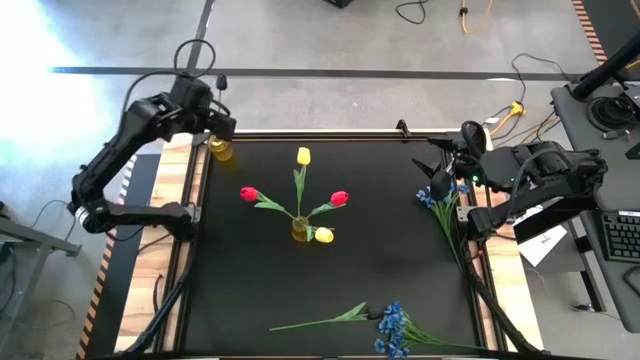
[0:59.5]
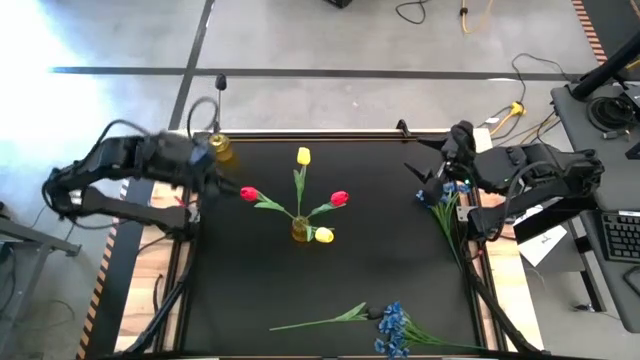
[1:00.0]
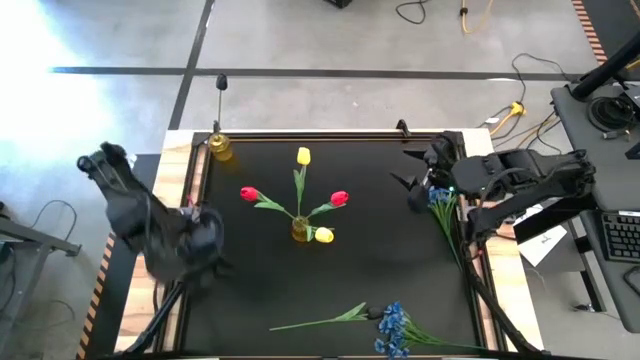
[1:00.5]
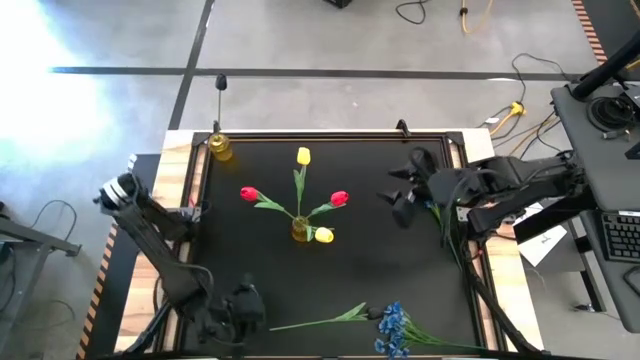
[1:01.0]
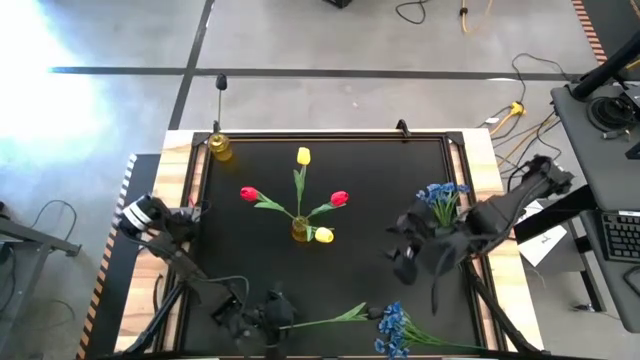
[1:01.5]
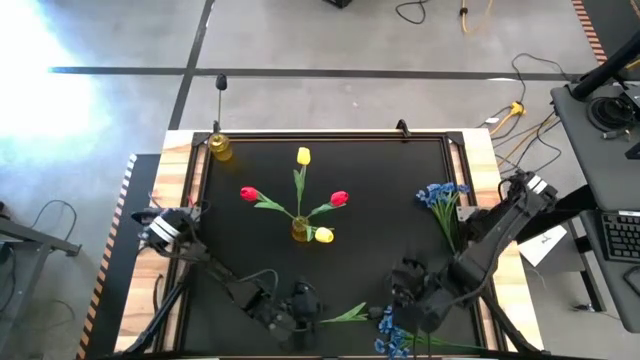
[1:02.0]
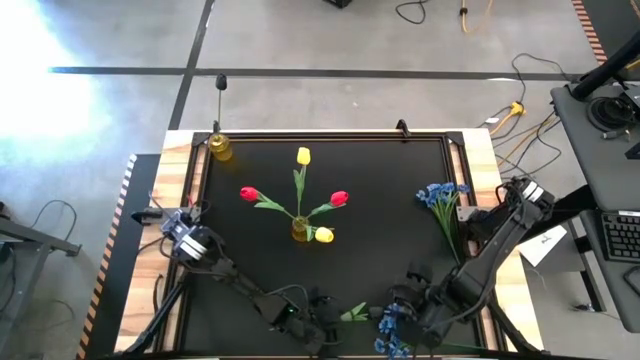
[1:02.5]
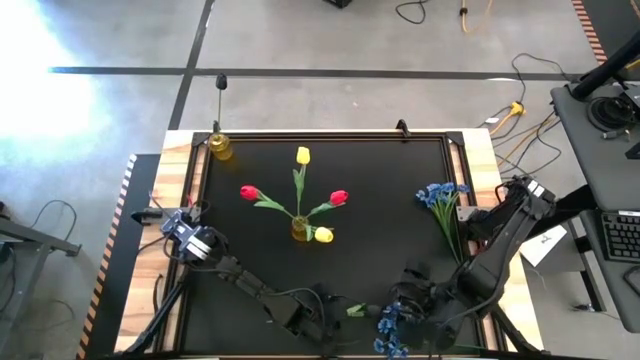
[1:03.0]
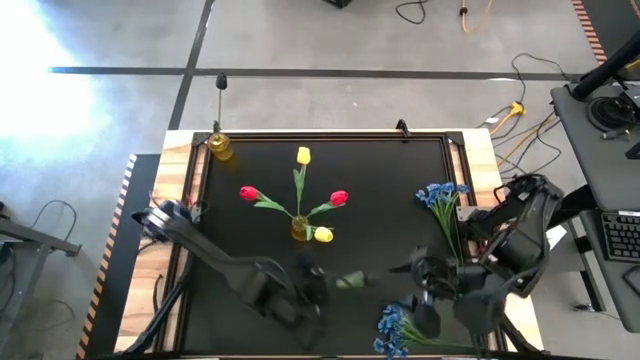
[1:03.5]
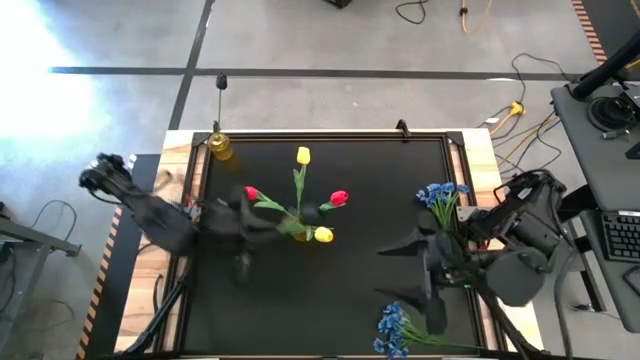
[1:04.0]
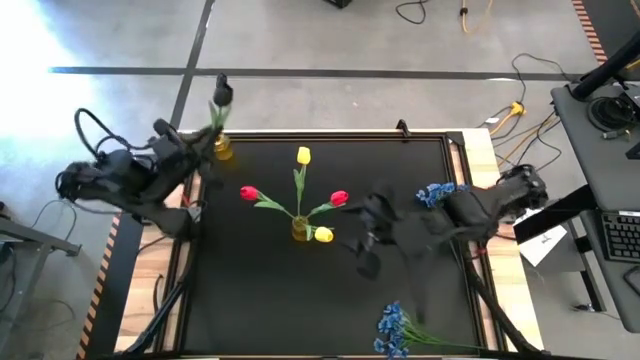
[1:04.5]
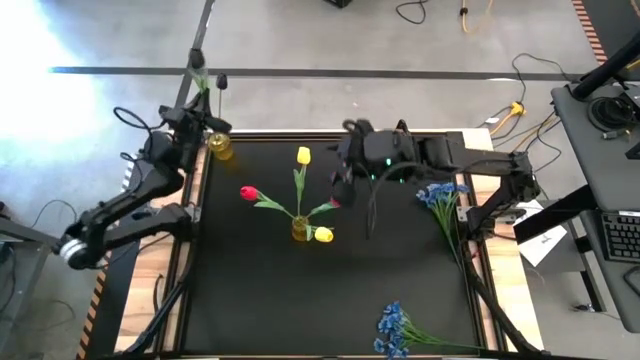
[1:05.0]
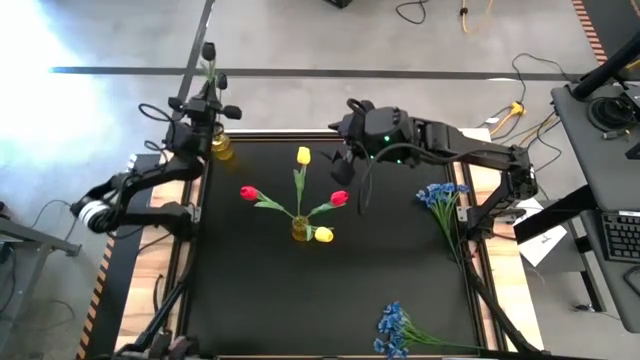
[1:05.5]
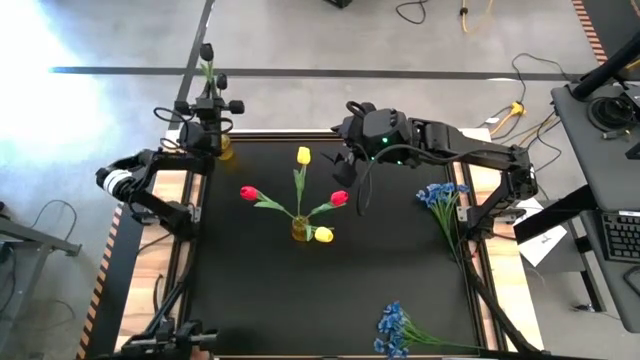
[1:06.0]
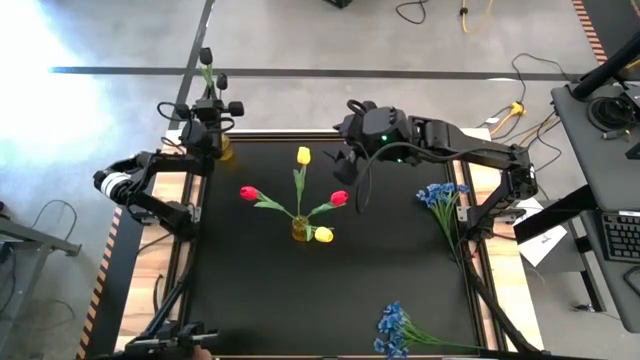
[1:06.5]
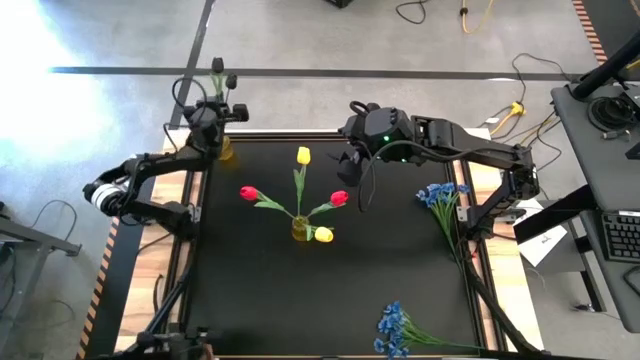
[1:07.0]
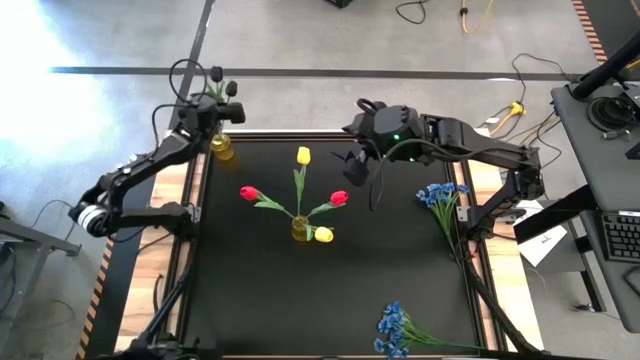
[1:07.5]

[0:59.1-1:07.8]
Task: Sort flowers into vase by color
Put the black tulip into the top vase

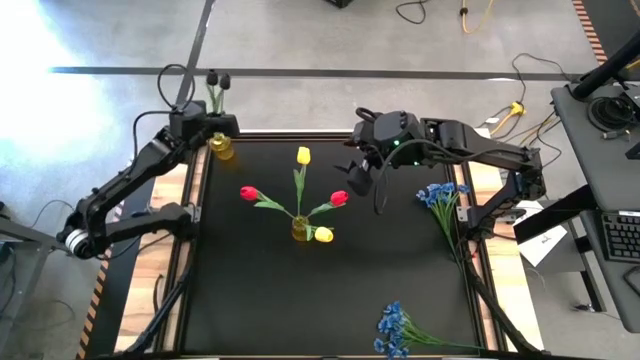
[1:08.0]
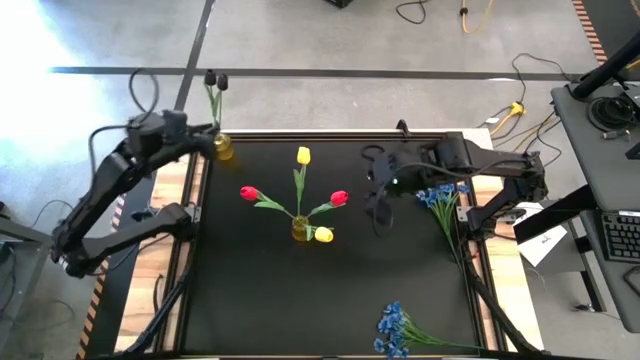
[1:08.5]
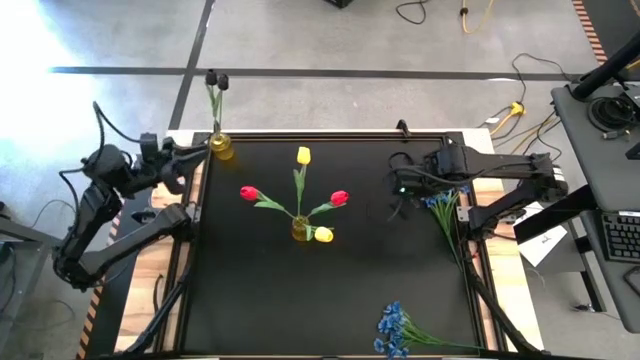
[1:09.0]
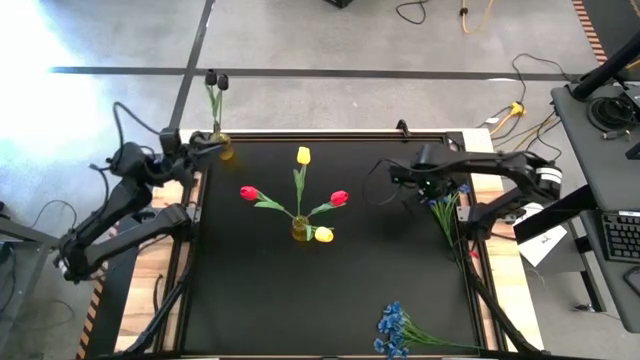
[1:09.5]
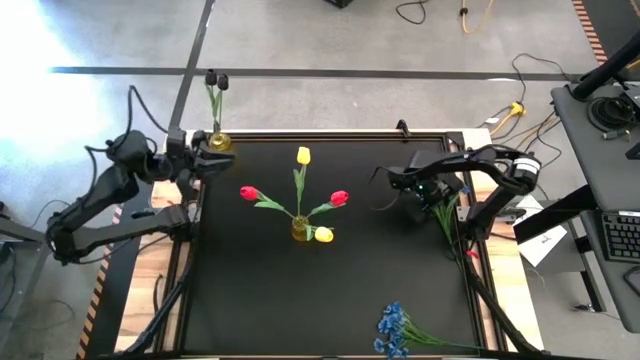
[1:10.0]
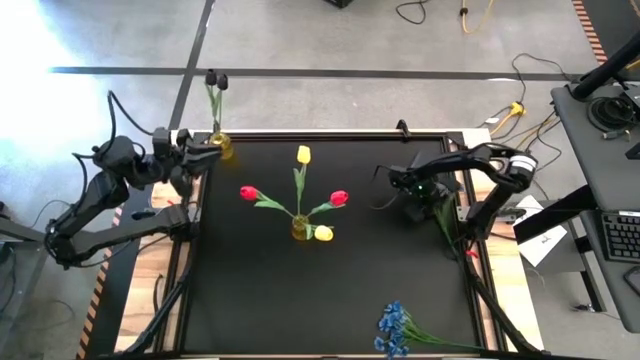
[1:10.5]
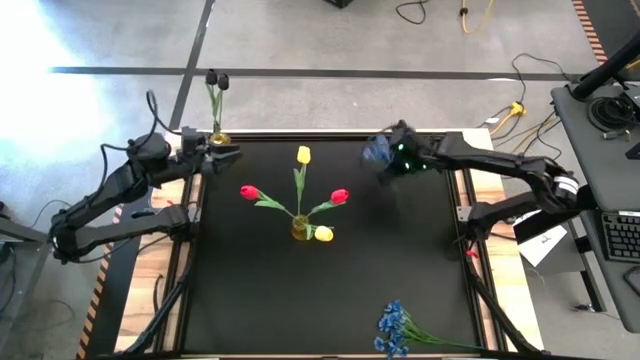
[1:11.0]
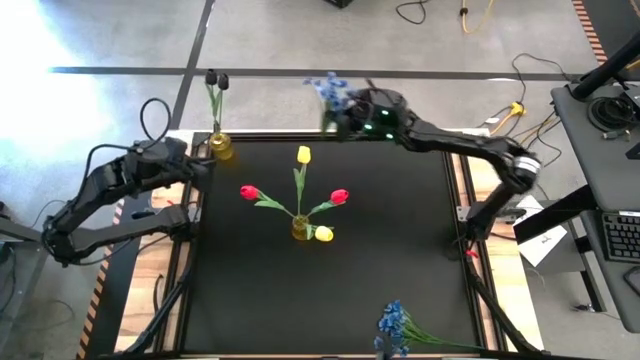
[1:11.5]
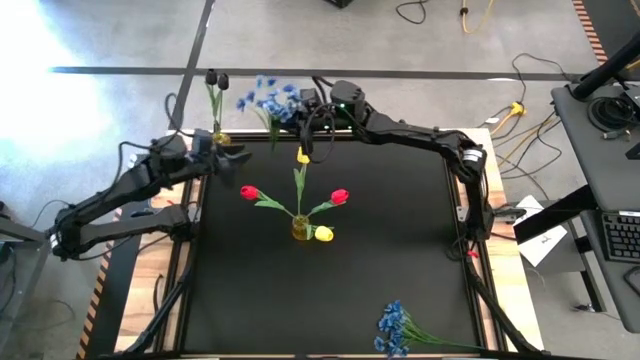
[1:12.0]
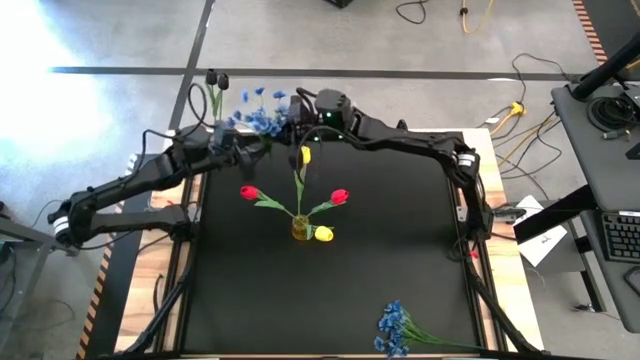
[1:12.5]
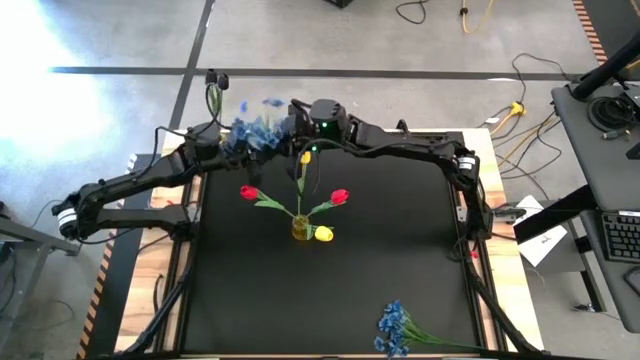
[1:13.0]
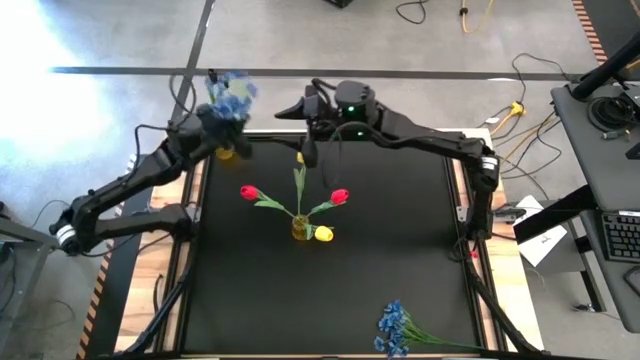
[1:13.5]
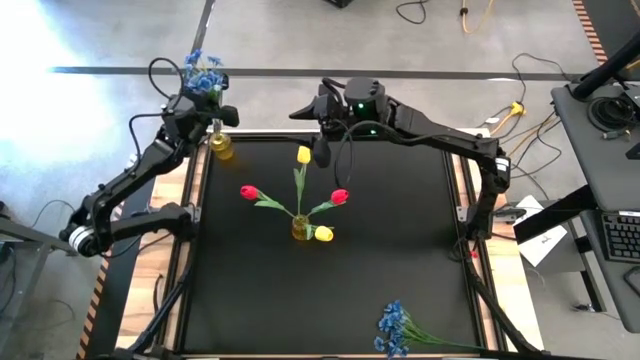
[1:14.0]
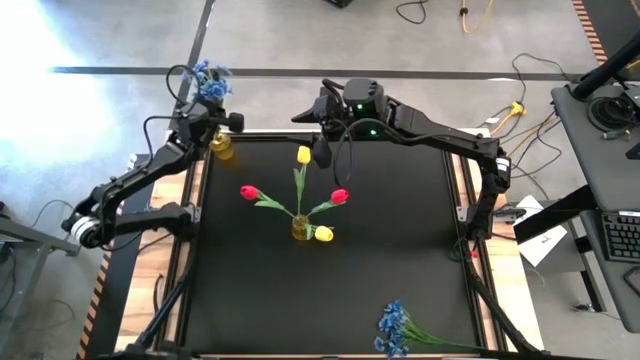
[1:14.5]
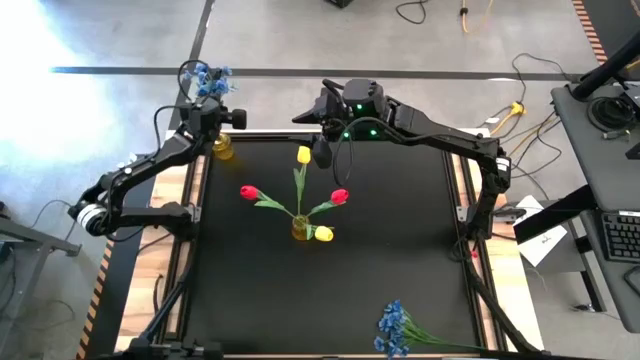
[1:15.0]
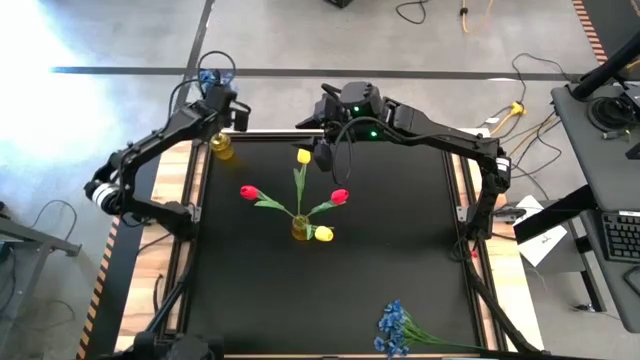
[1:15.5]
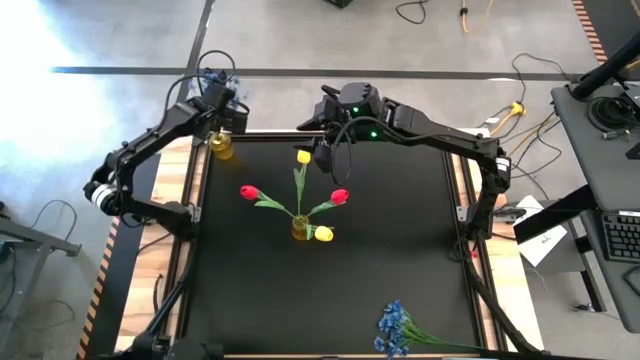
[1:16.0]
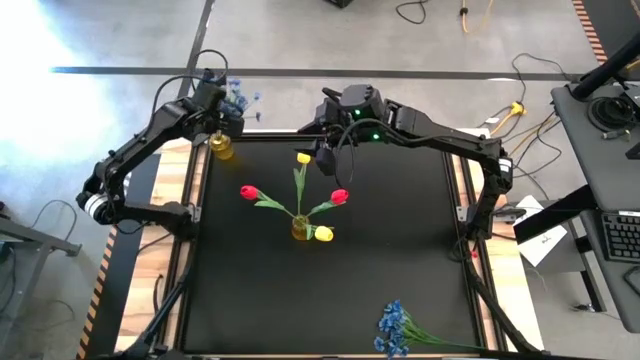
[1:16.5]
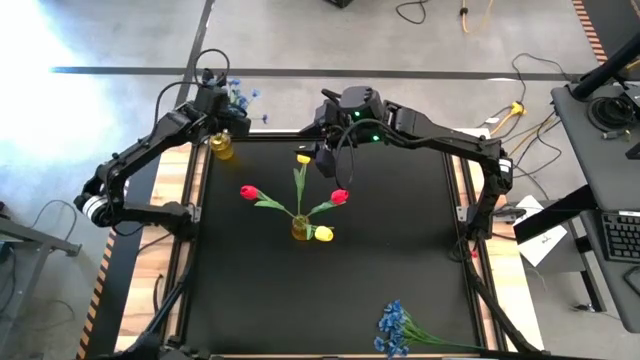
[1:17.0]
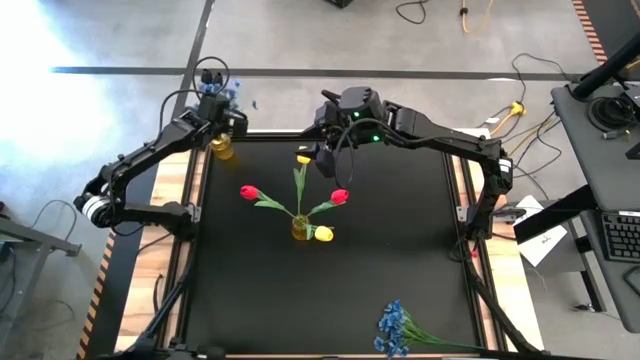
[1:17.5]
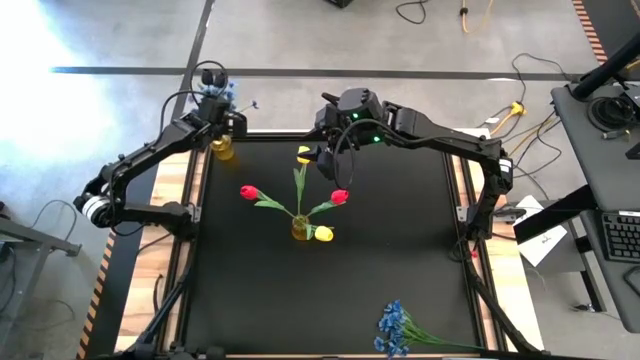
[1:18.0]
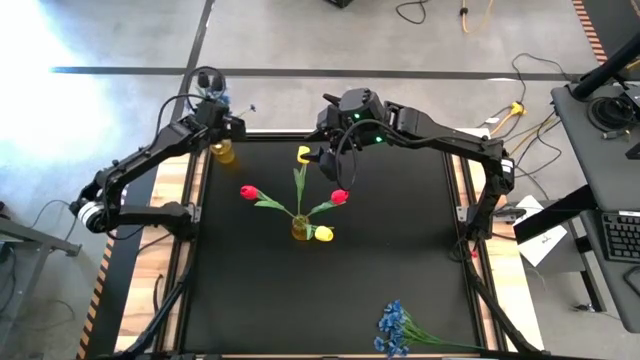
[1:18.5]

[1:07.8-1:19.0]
Put the top blue flowers into the top vase

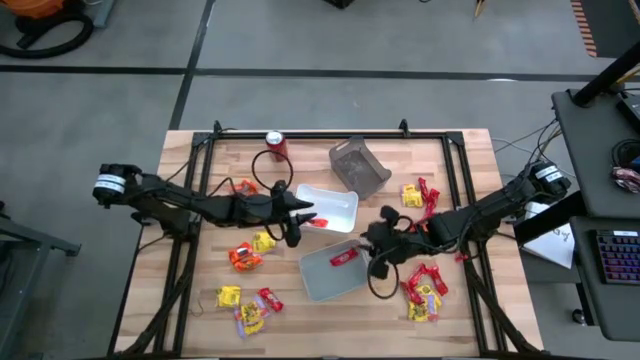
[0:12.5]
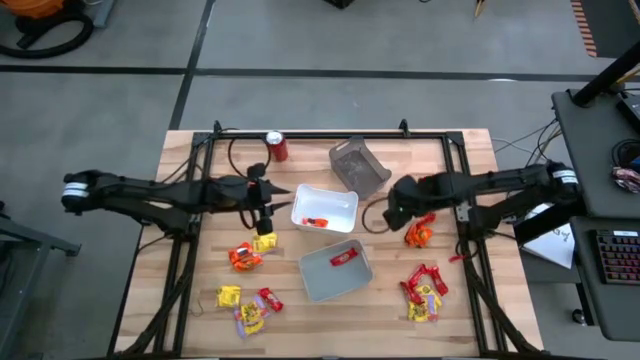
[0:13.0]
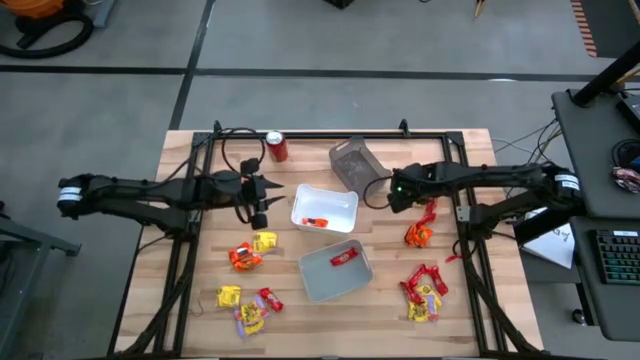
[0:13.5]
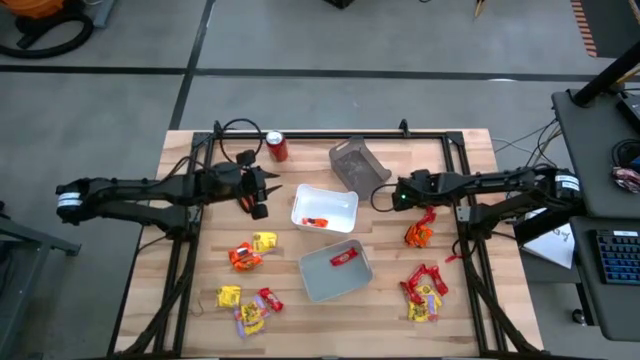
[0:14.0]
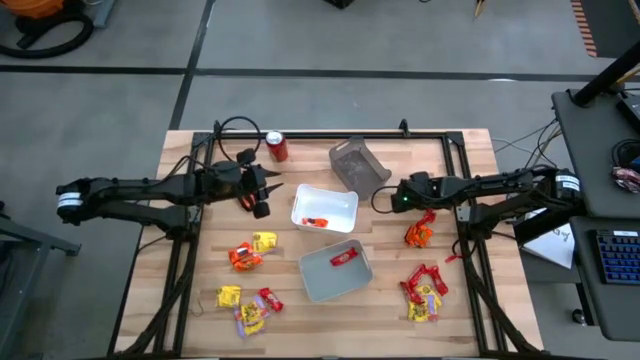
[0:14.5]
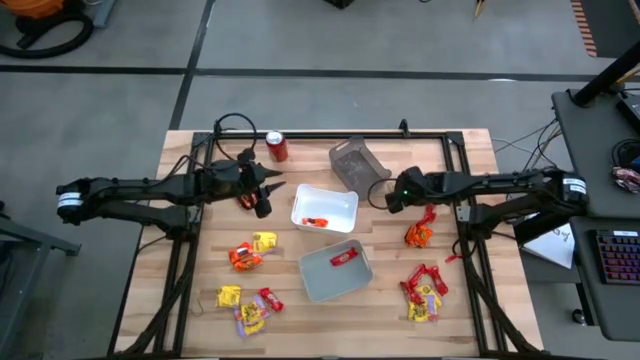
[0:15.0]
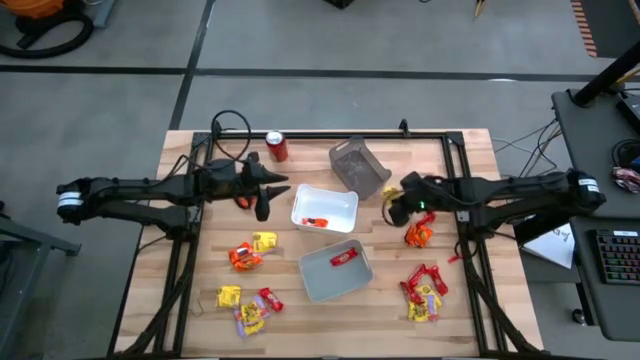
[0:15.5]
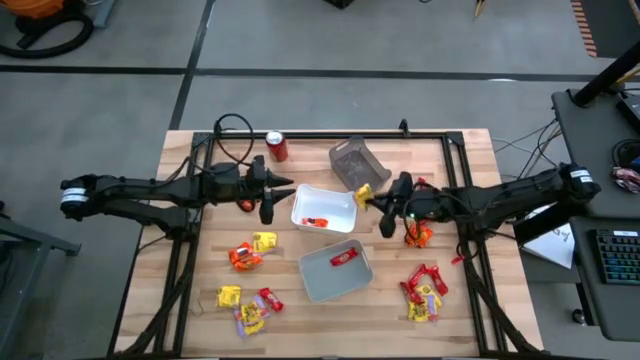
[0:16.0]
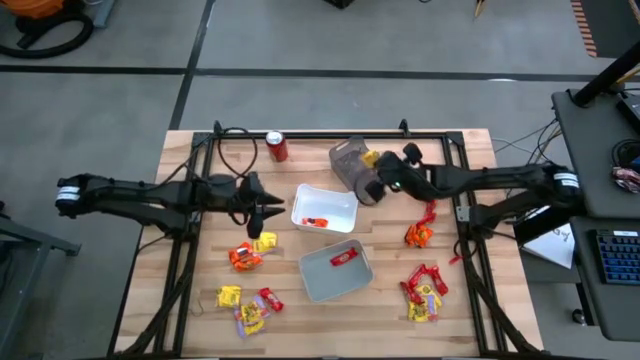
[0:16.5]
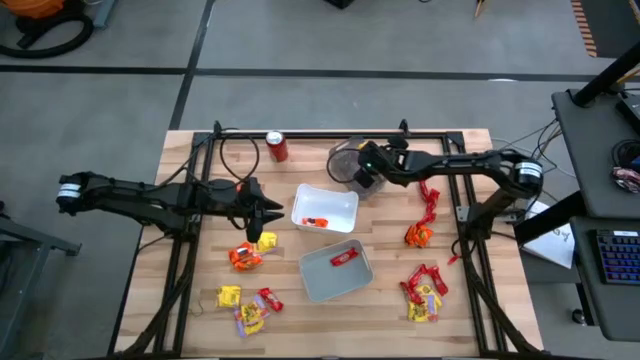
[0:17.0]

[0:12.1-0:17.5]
Task: Sort candy
Put the yellow candy pack into the black bin
